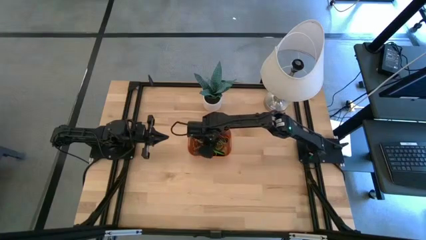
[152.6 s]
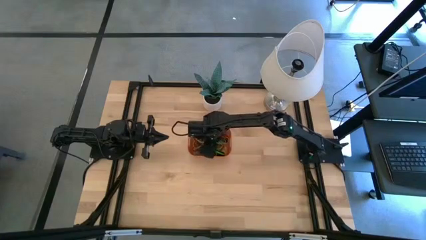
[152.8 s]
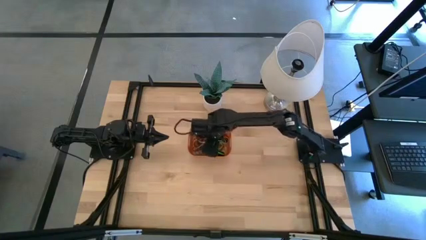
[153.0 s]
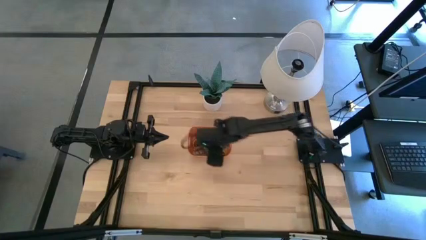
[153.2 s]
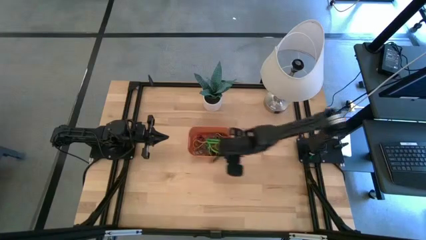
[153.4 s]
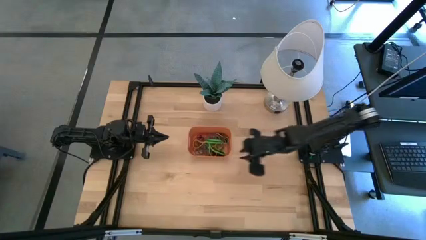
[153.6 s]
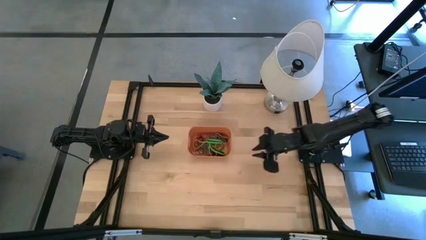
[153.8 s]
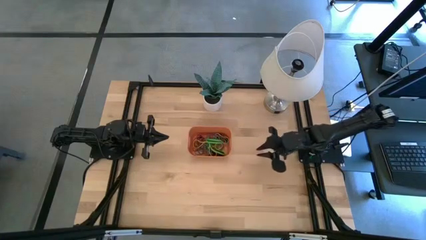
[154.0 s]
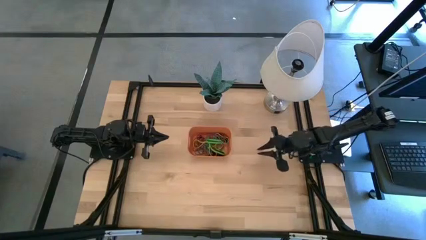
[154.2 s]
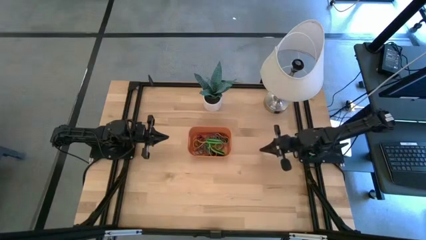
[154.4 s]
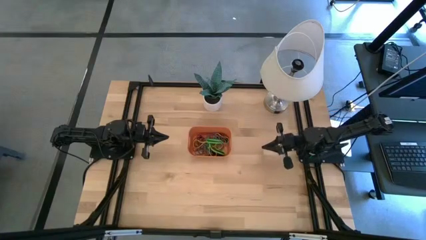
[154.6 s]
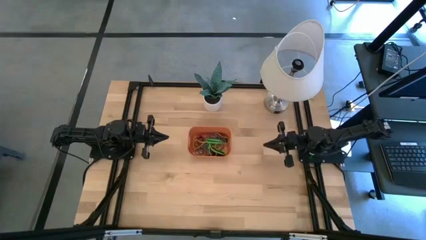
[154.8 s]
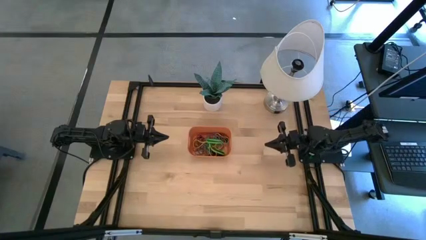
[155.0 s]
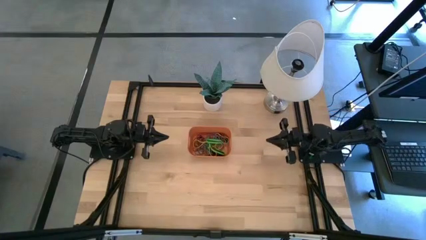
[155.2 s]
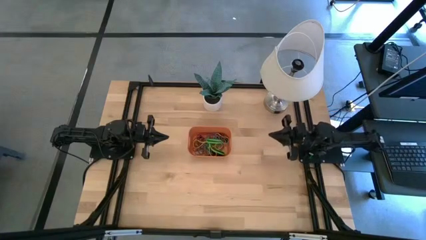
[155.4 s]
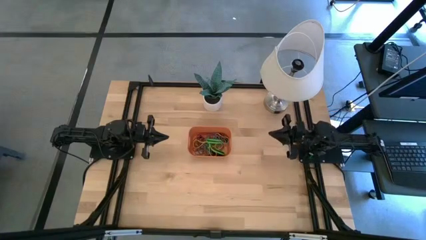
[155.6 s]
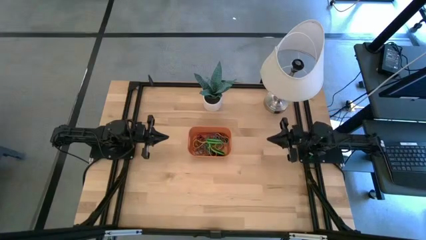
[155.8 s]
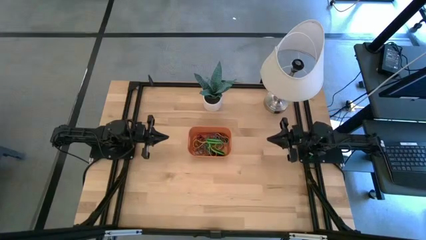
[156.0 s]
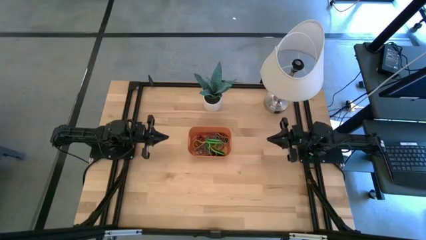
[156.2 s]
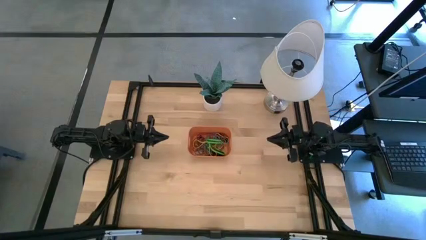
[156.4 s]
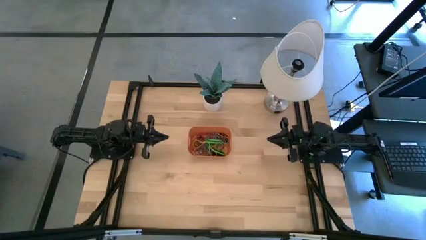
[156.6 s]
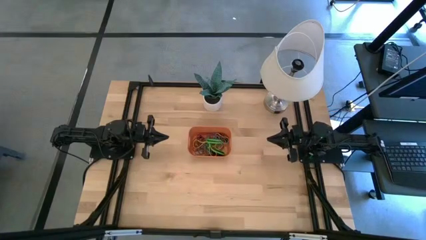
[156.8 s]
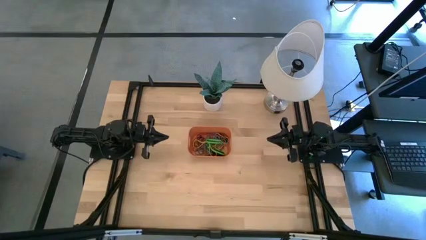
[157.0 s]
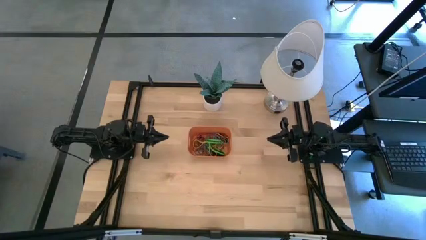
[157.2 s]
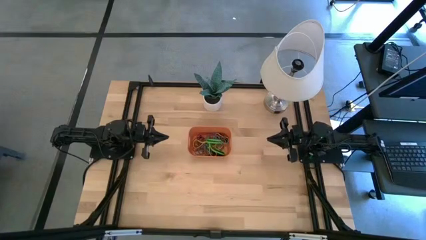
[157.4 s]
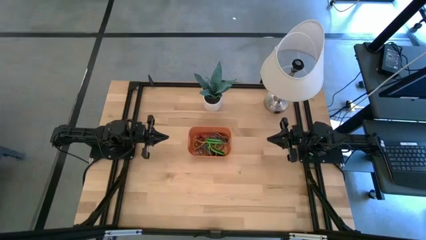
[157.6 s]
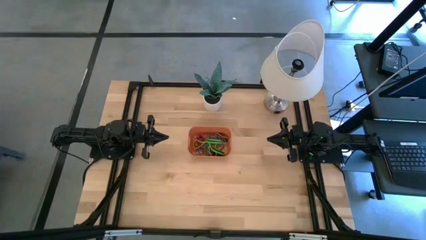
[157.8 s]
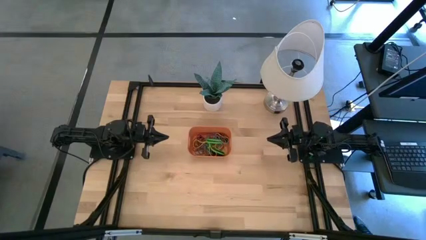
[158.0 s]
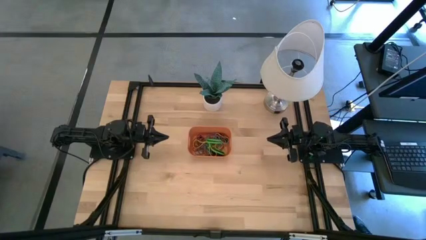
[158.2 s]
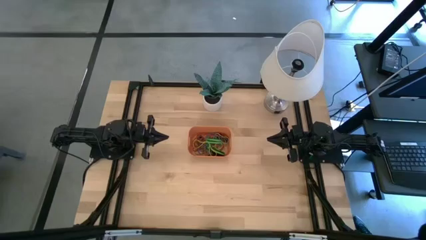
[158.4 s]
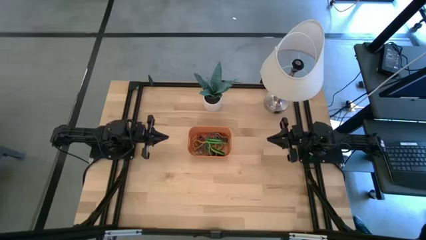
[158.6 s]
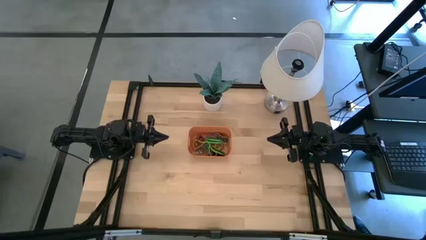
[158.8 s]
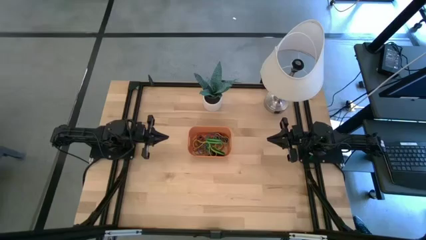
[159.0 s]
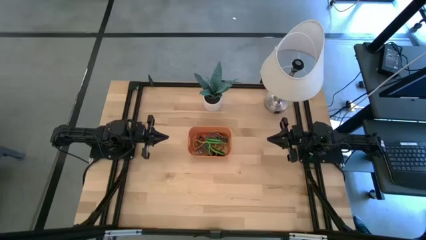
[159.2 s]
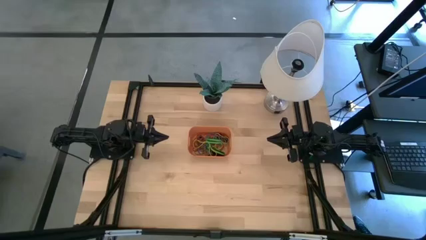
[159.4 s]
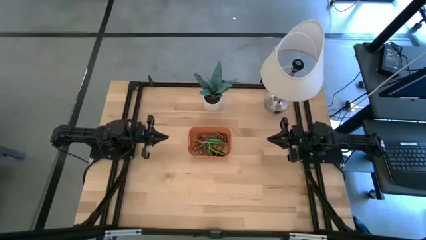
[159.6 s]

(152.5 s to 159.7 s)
Task: Pick and place rubber bands into bin
Return to Home Position

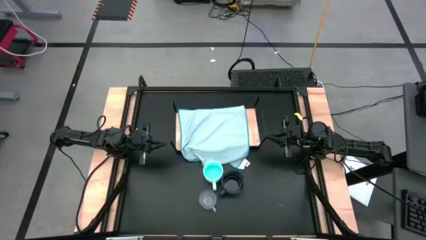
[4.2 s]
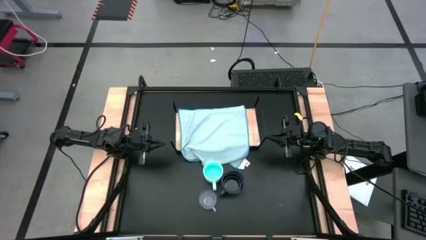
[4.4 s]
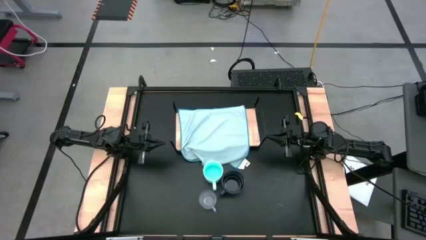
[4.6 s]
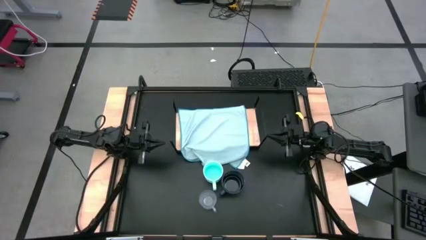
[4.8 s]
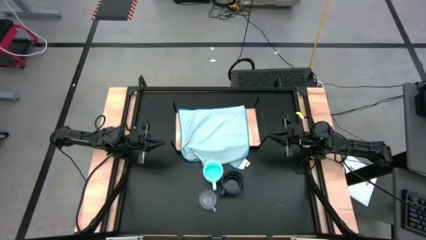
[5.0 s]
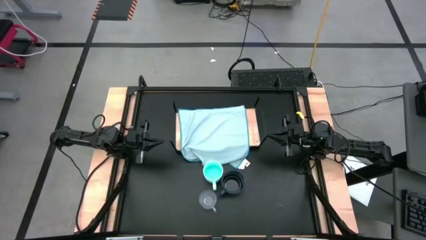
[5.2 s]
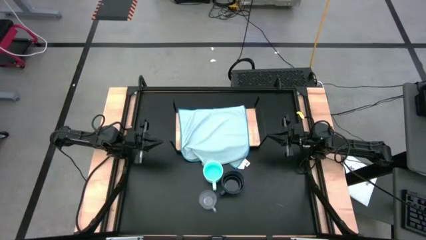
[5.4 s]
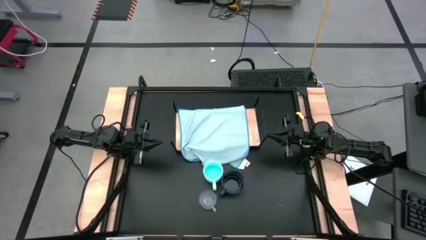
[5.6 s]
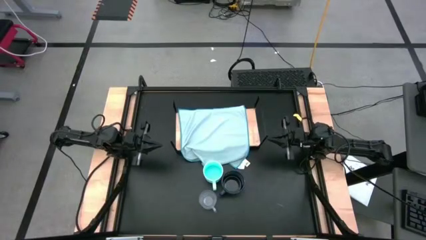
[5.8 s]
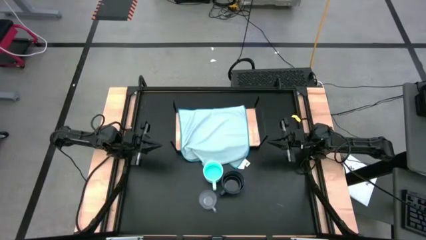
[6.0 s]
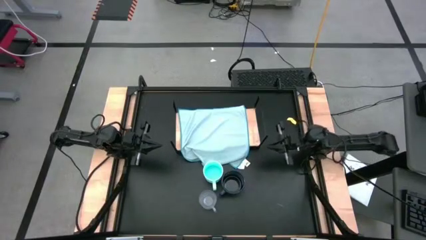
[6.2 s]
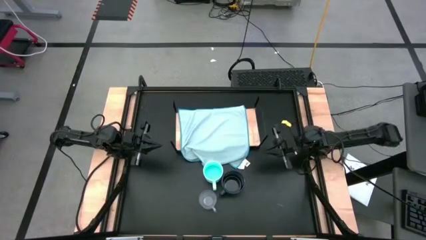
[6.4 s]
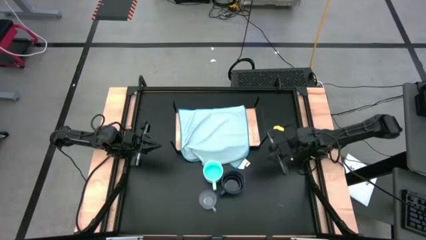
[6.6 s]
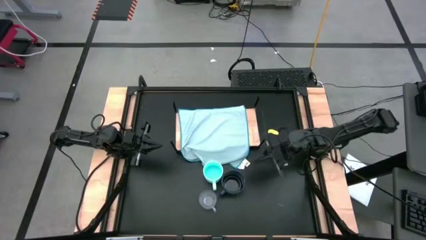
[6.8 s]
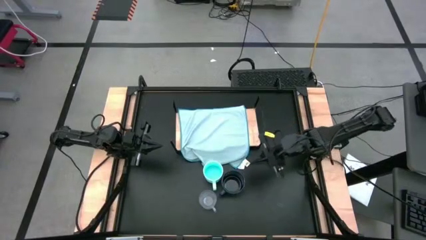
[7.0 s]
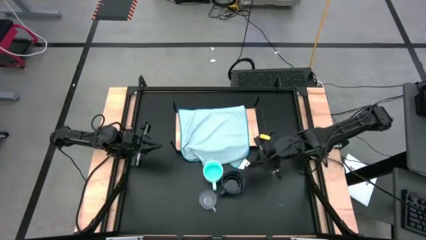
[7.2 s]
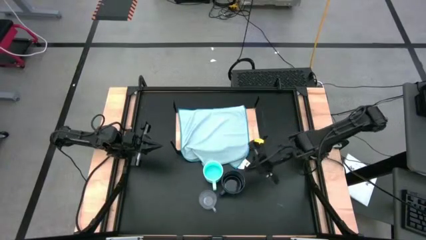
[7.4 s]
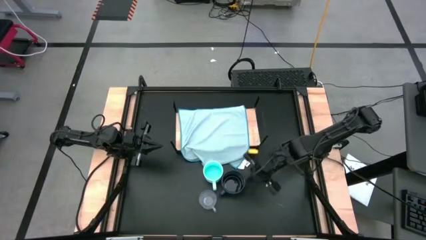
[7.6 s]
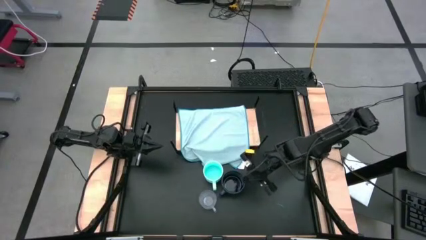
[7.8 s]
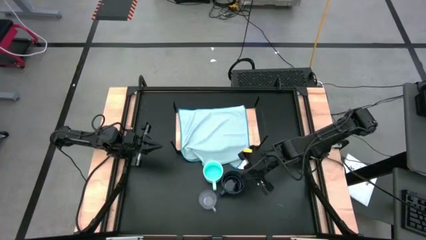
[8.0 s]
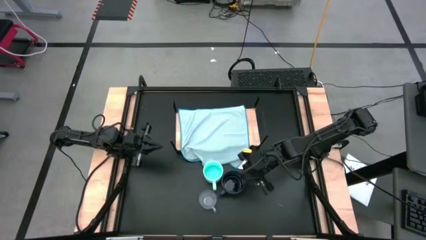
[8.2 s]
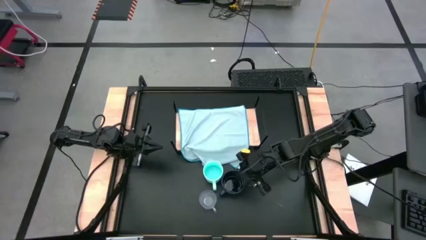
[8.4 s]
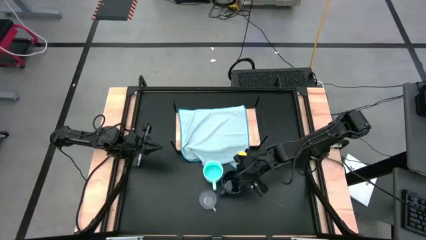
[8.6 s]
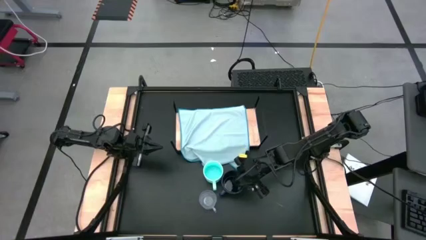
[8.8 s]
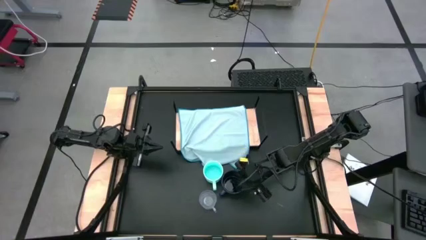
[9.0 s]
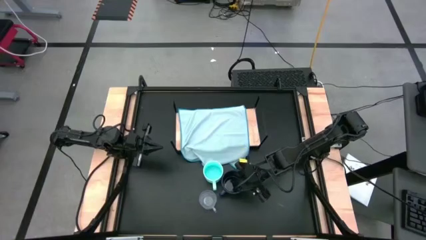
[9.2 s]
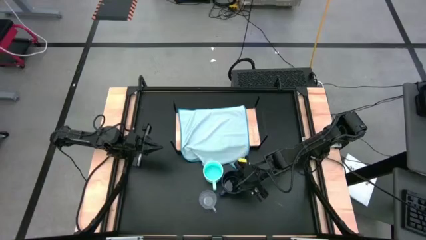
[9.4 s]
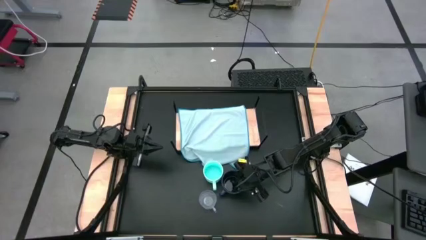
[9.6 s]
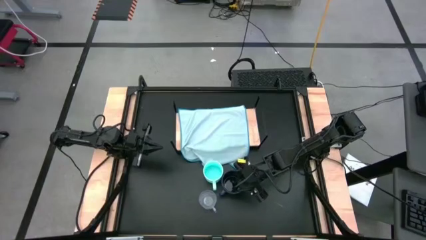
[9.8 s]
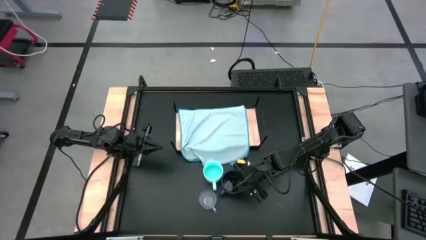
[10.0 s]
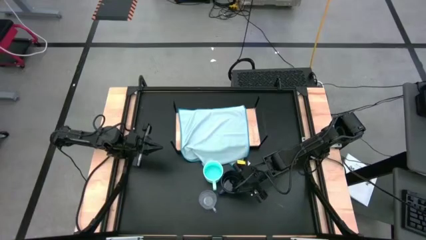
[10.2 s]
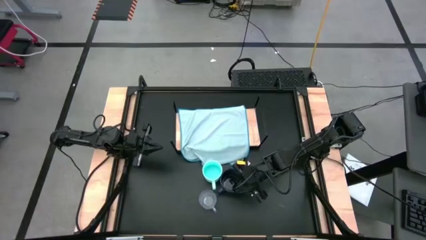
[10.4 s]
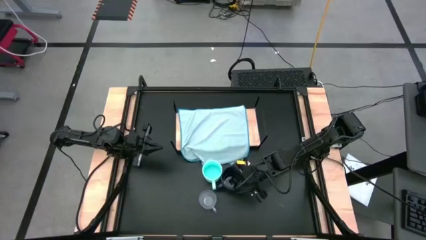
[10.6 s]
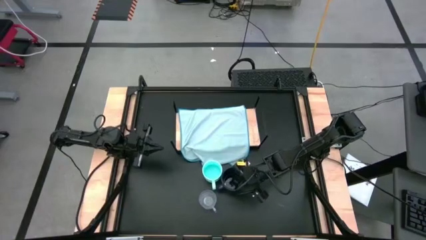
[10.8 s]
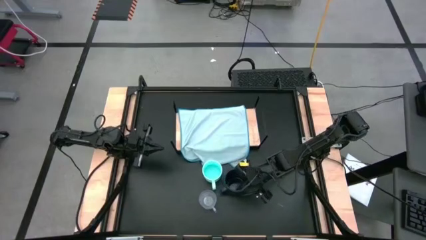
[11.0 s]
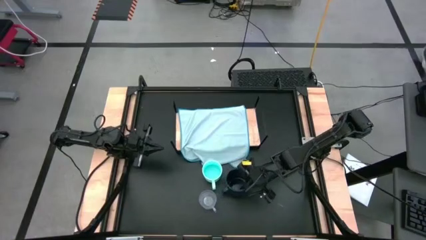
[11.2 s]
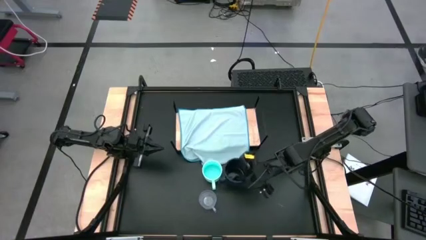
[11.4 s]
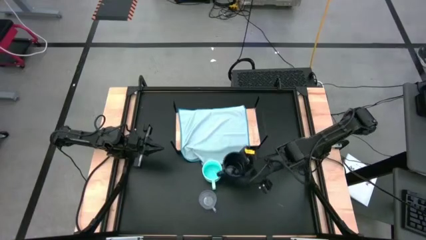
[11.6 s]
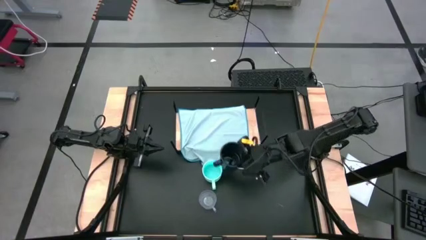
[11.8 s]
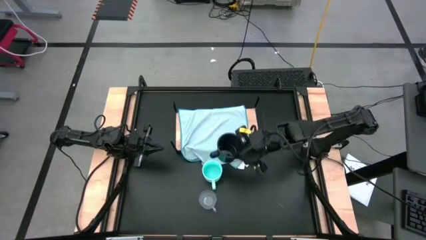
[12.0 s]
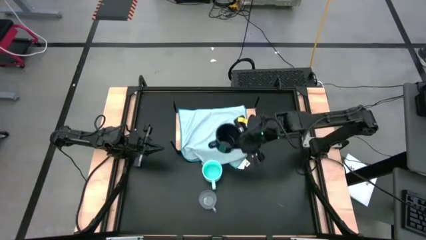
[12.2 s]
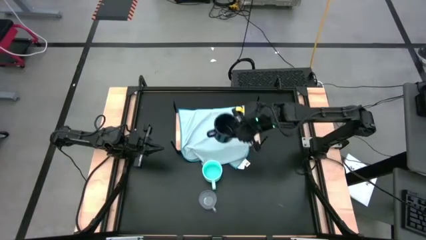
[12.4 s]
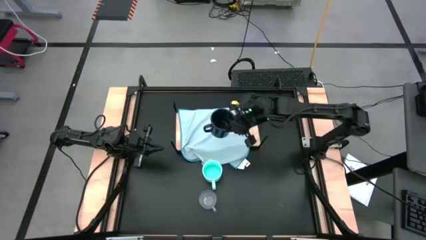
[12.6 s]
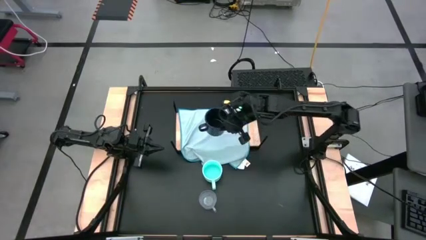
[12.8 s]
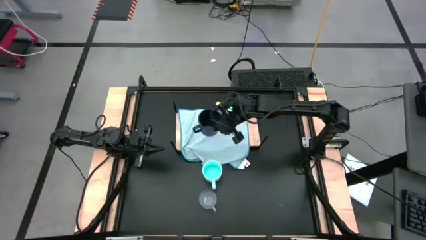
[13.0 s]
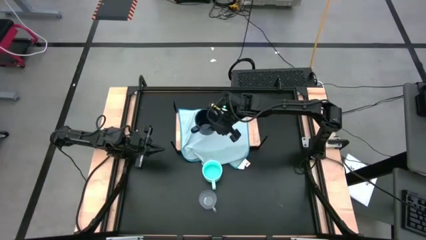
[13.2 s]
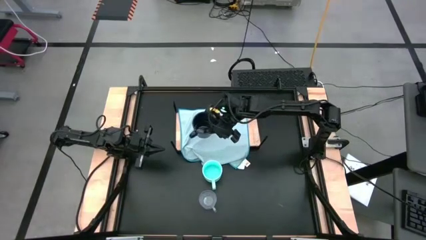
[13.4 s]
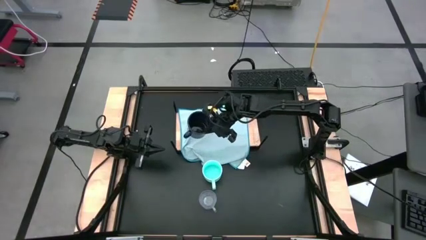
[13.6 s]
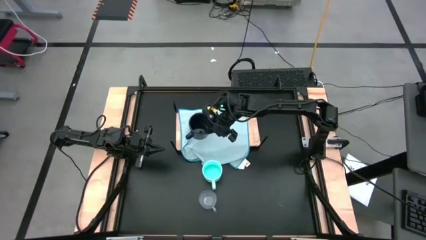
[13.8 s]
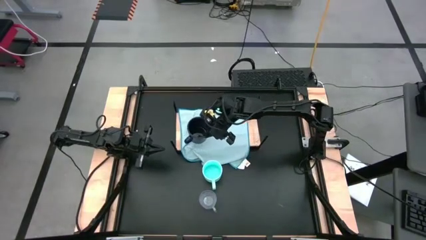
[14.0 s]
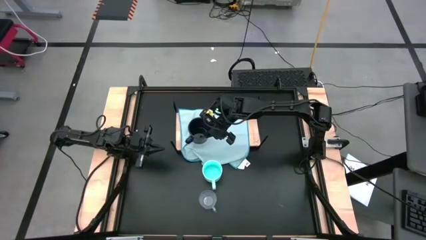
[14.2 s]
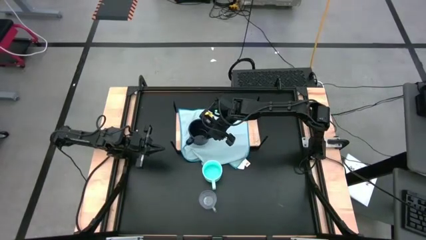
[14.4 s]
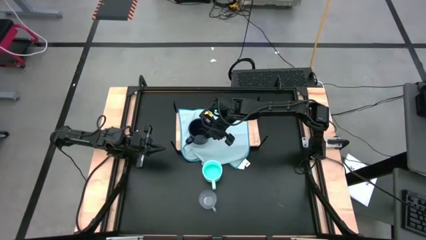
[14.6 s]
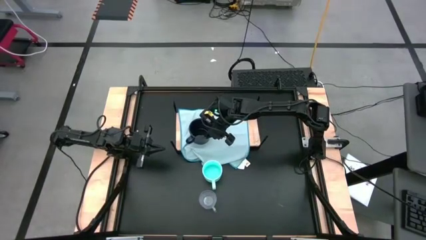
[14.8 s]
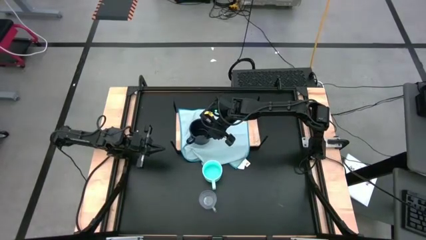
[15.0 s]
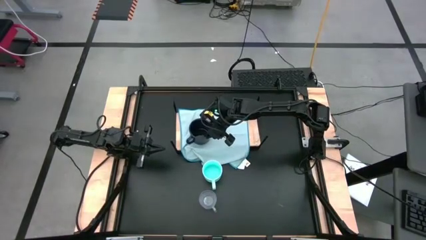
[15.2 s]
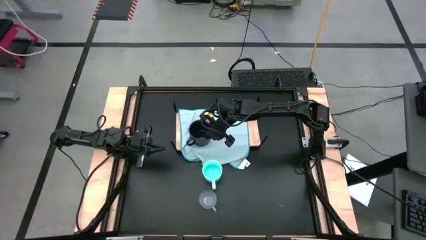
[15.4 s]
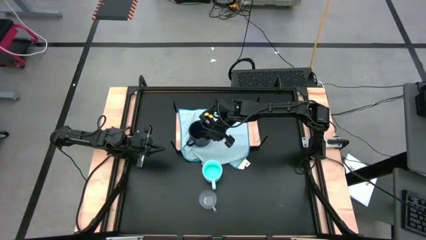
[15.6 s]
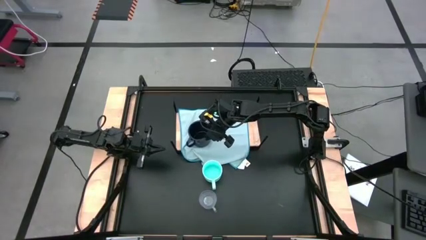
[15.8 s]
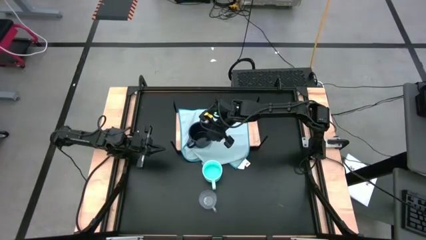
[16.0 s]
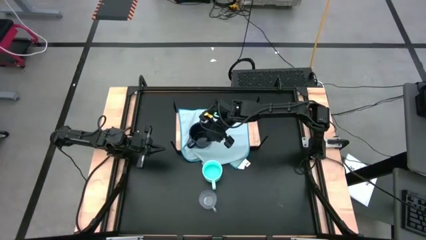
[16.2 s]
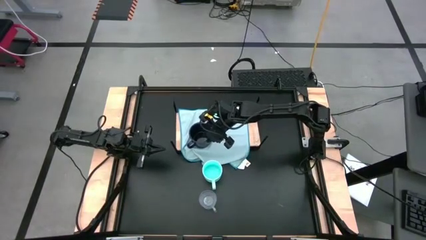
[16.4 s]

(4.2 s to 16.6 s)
Task: Stack small to large cups/mugs on shelf
Put the dark blue mug on the microfiber cloth on the shelf
